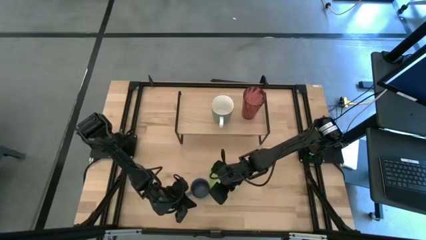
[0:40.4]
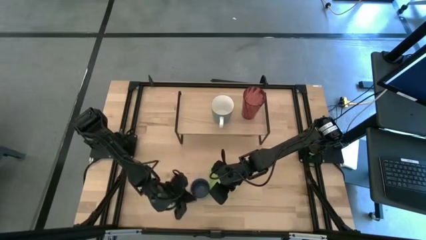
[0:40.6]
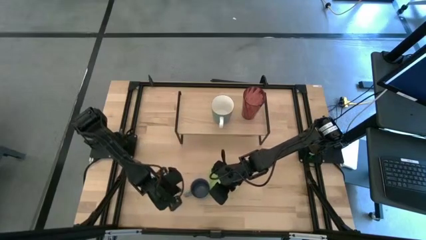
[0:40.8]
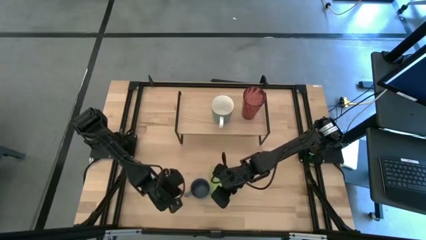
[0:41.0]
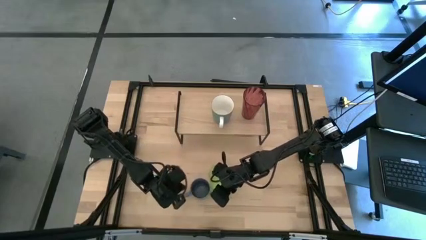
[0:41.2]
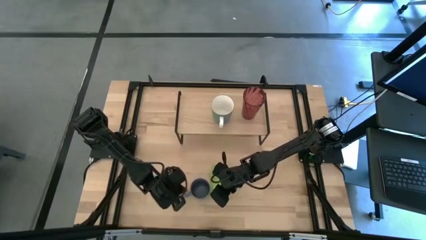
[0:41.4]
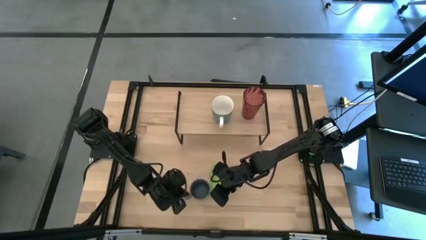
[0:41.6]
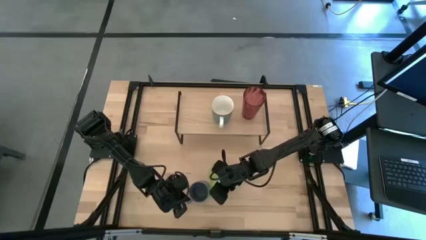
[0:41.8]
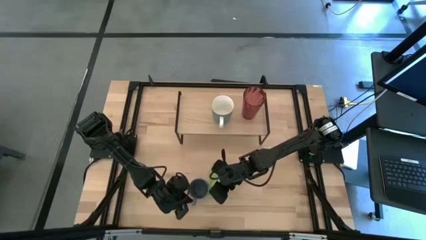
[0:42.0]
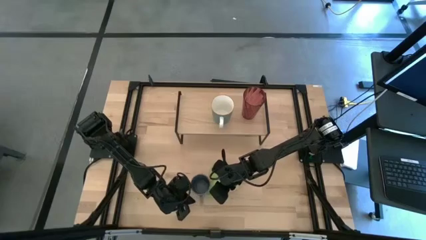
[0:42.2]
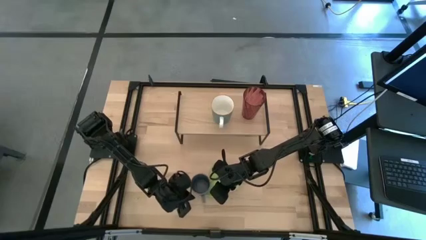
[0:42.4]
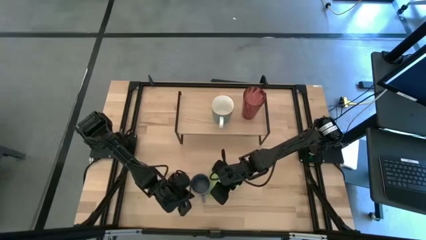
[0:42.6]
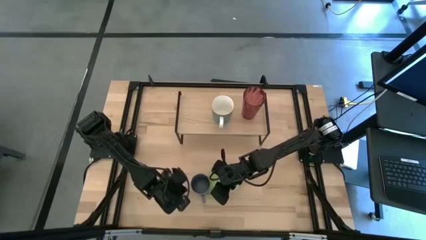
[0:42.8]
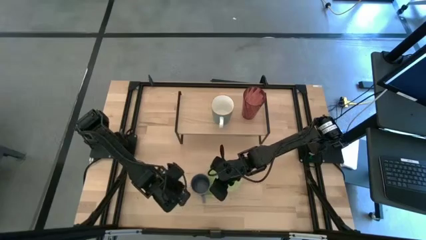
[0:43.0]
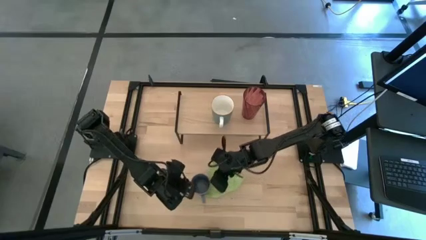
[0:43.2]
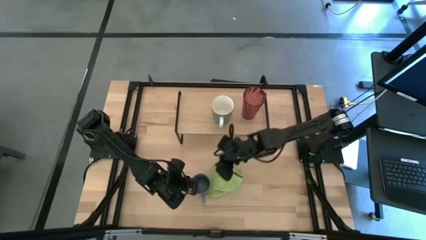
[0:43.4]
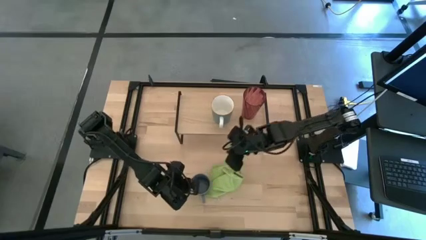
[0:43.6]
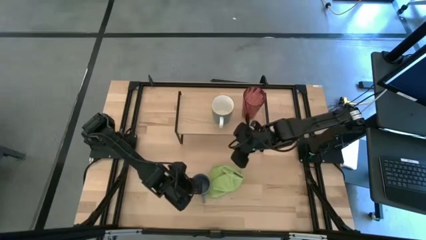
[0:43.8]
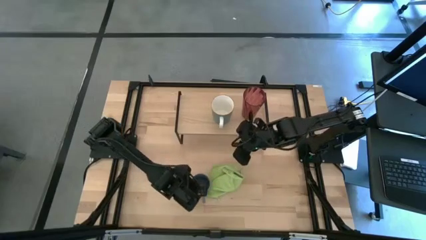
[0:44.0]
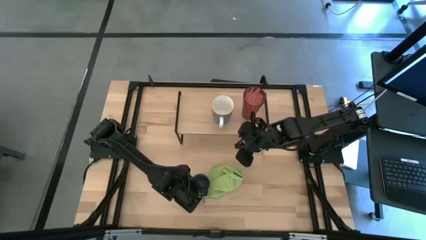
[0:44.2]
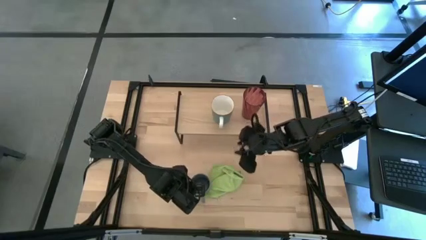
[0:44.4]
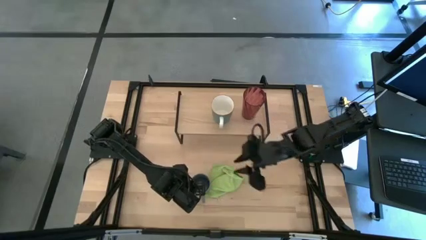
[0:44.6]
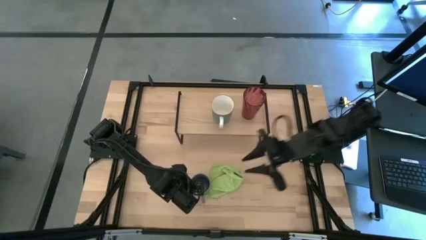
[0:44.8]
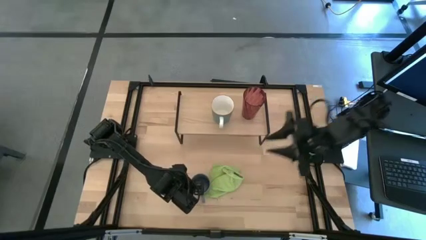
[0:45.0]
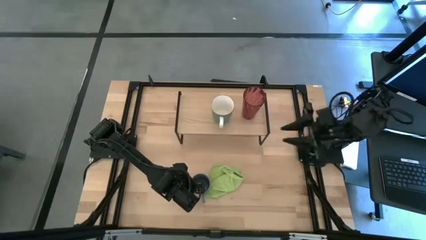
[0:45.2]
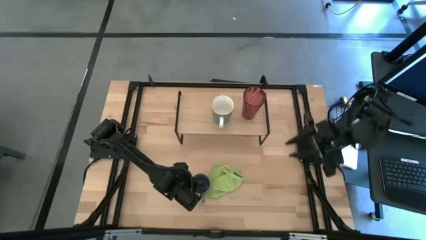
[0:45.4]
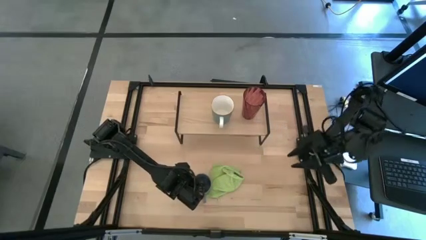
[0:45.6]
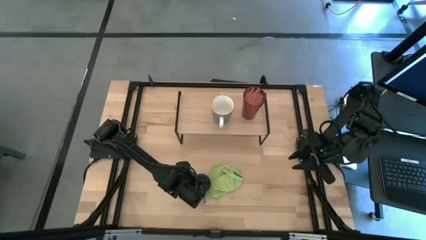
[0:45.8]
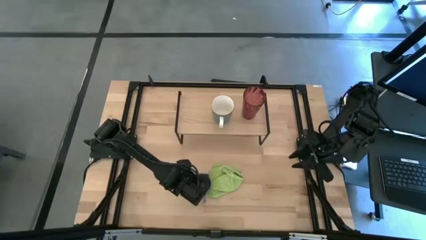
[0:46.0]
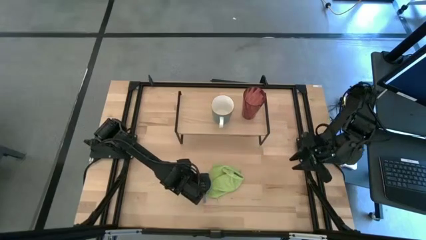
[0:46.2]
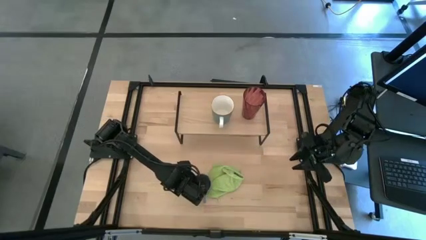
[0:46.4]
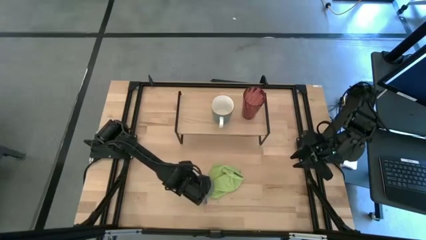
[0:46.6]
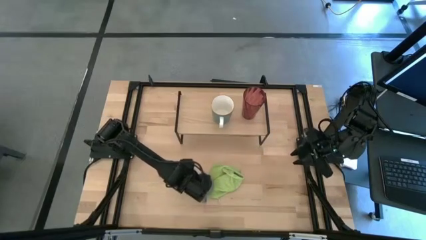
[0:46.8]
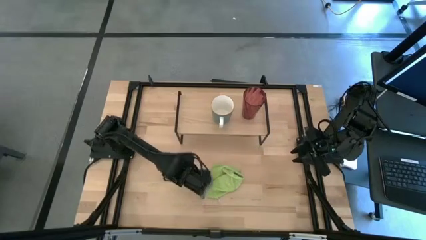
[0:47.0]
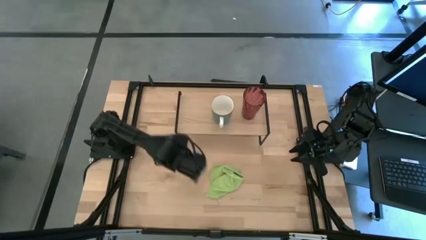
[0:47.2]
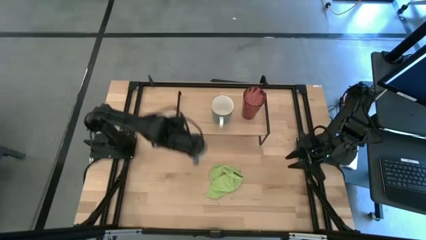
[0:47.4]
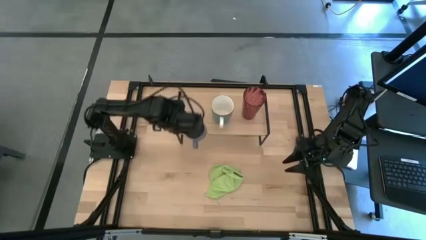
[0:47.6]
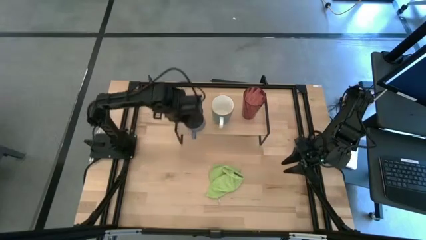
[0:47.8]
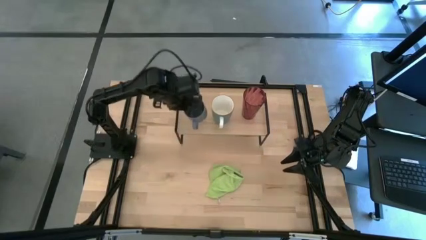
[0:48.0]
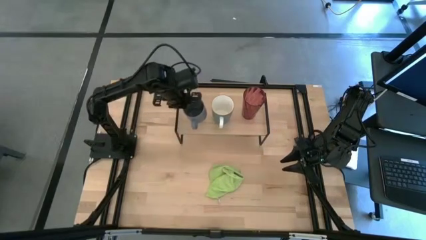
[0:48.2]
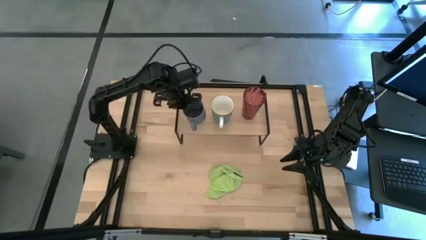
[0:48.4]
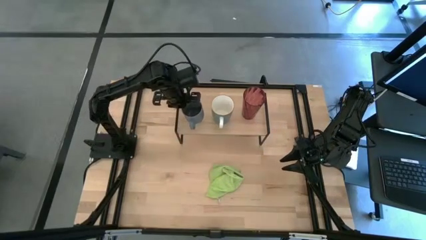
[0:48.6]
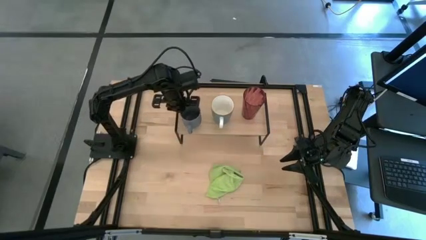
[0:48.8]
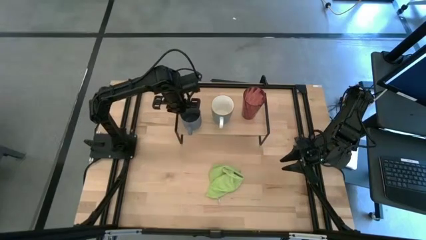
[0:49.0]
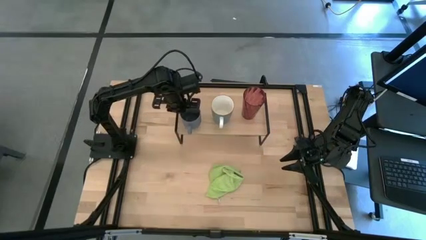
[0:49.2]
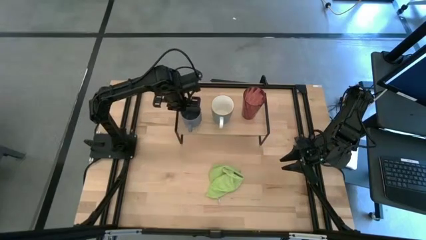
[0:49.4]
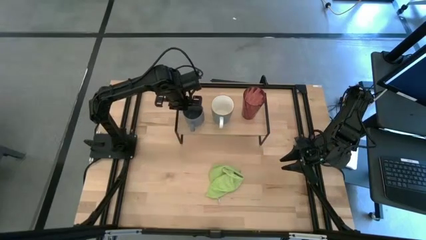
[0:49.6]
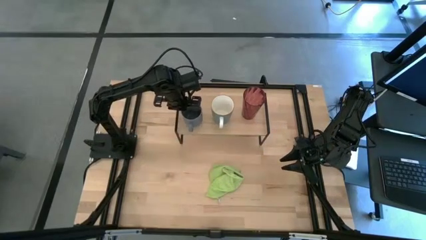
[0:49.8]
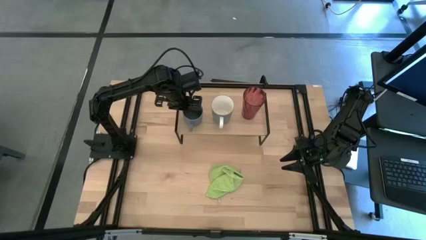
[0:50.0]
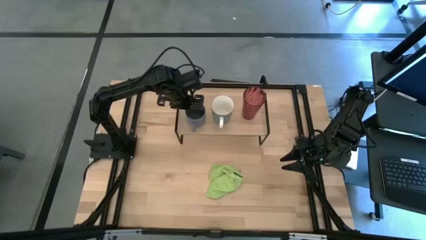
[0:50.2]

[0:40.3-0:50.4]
Task: Stack small to large cups/mugs on shelf
Put the gray mug on the shelf

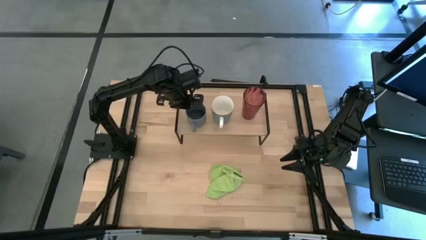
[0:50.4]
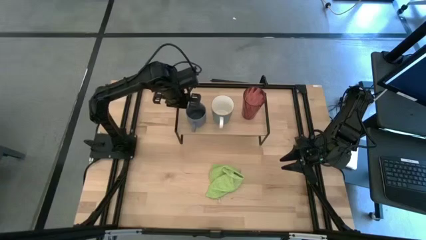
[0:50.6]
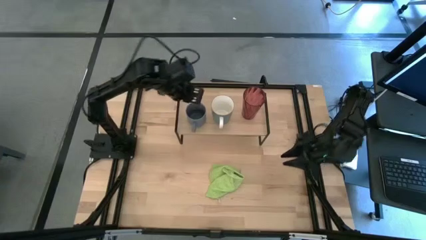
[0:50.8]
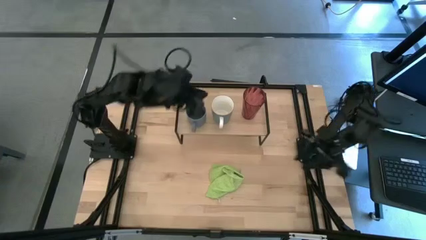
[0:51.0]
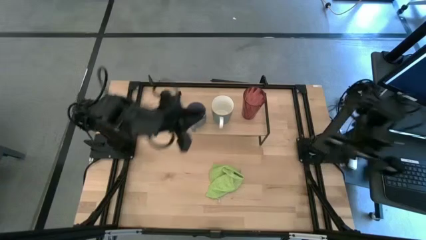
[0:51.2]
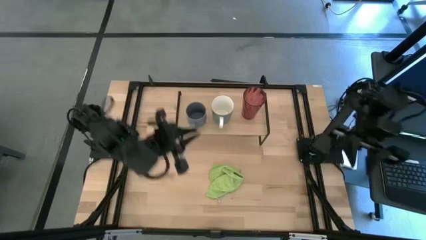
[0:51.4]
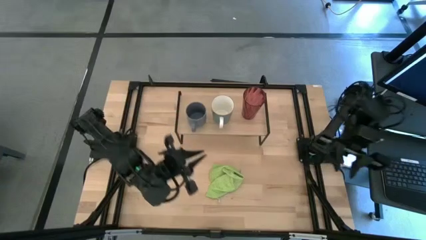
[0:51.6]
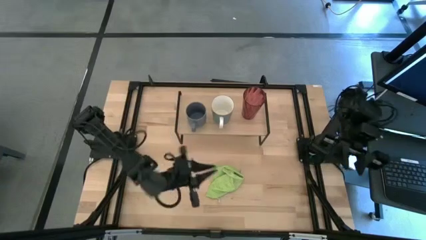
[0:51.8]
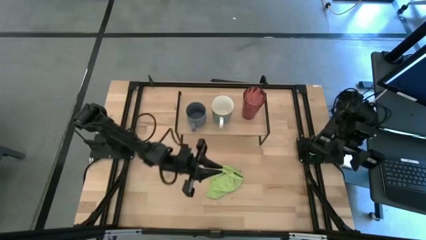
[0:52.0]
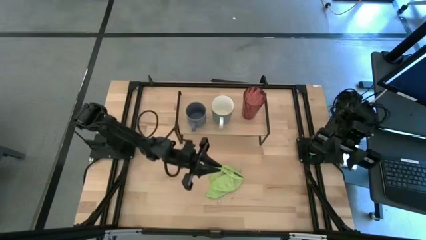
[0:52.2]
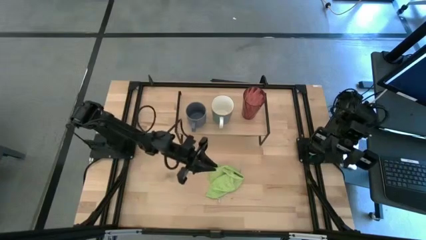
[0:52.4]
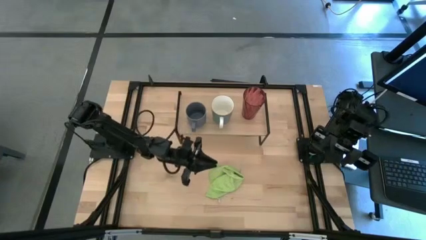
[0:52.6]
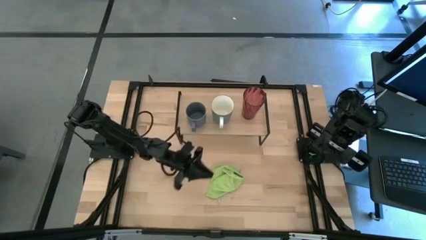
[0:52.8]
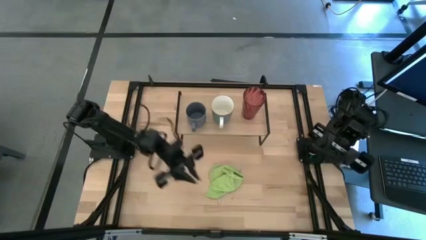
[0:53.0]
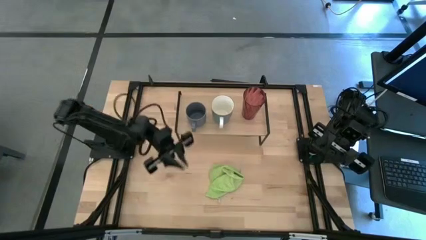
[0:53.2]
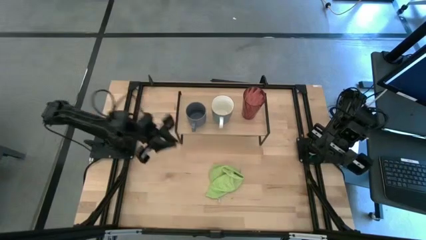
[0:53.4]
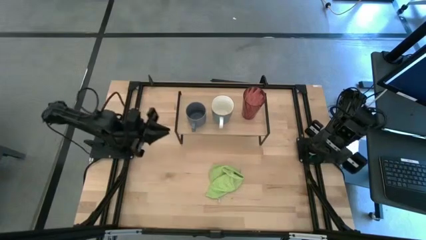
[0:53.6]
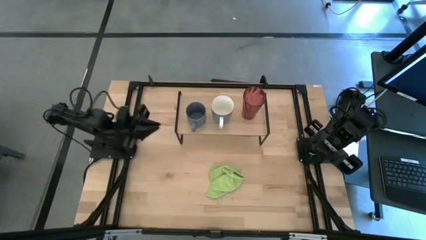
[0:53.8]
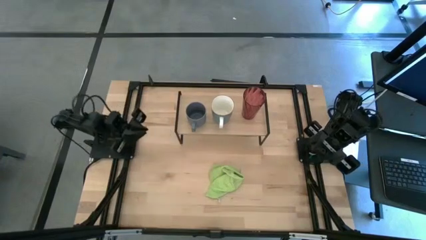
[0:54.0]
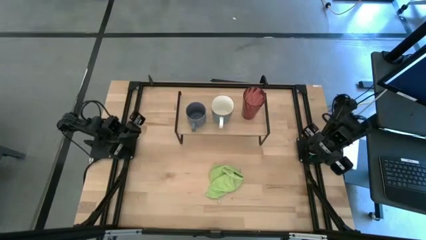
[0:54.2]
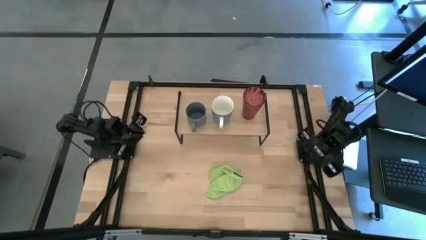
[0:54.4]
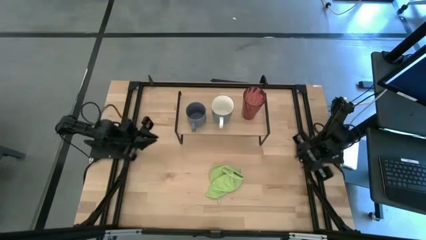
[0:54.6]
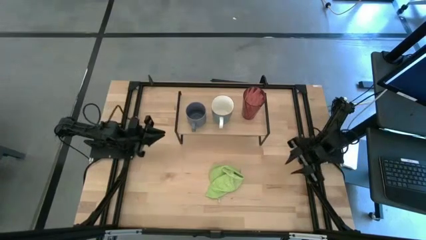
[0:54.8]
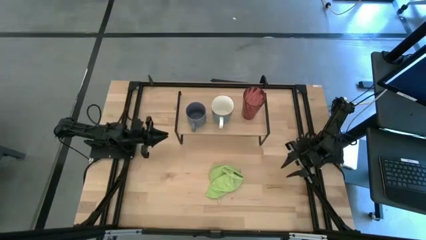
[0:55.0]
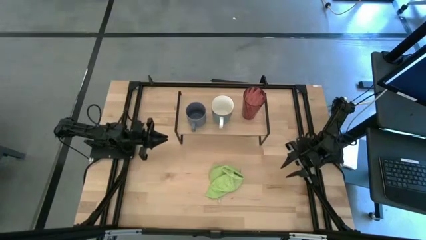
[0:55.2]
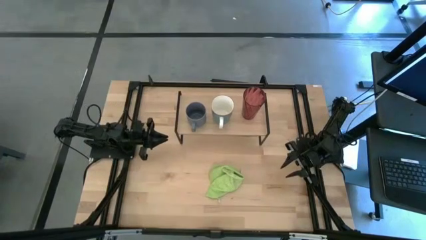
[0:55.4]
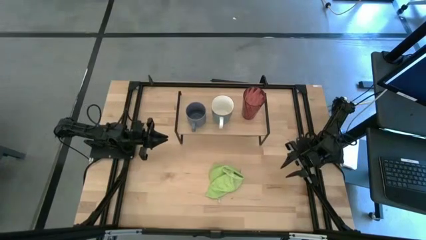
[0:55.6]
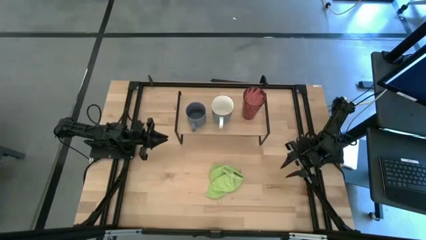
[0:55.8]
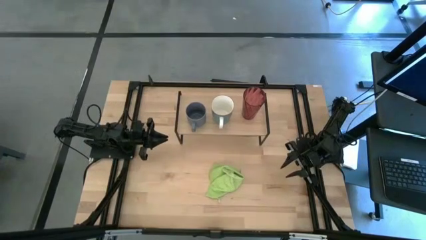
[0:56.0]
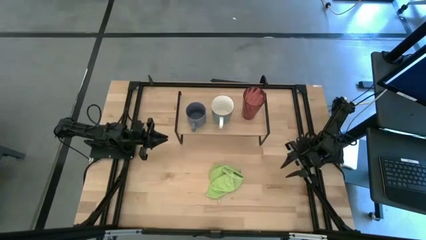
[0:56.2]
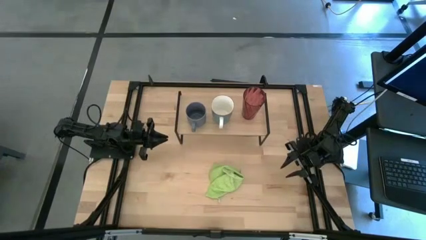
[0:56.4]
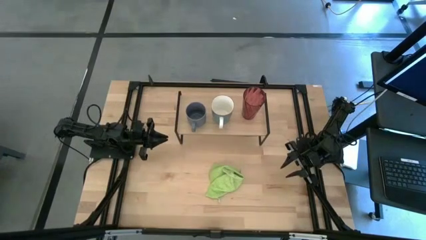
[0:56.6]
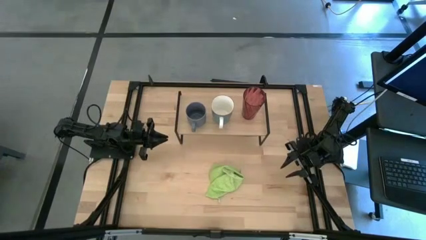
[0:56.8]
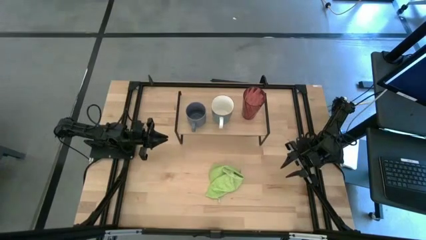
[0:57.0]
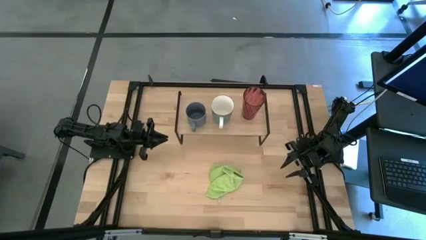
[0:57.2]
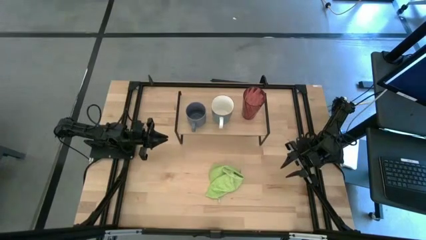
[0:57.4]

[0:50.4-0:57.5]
Return to Home Position
